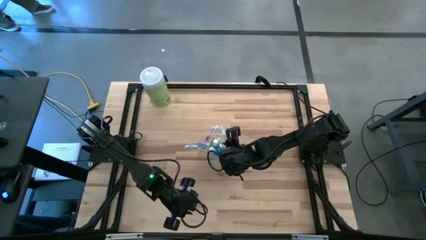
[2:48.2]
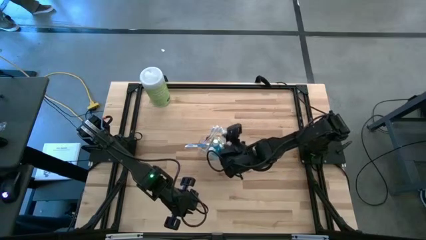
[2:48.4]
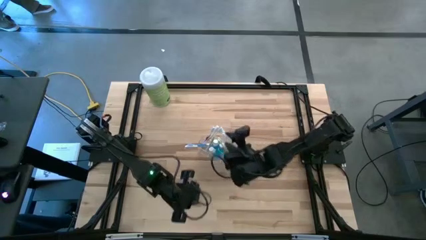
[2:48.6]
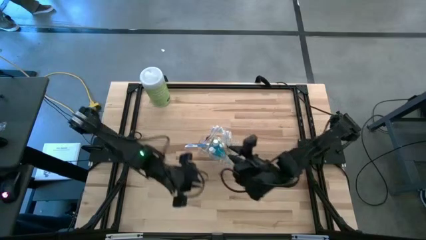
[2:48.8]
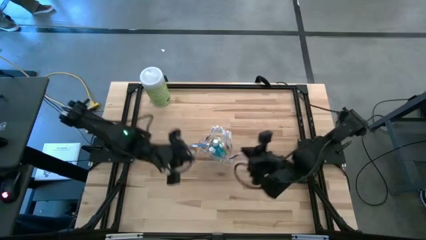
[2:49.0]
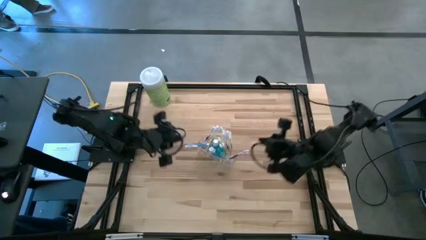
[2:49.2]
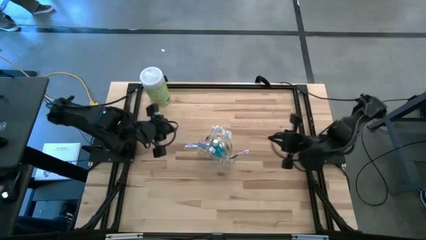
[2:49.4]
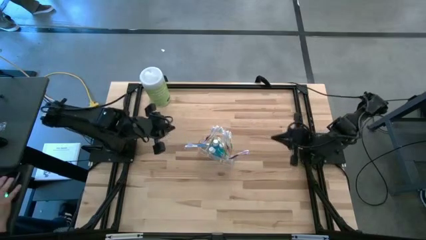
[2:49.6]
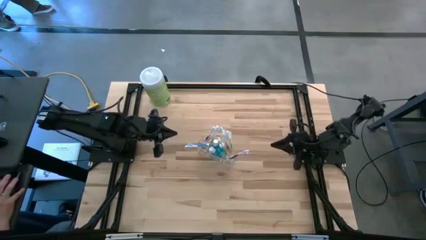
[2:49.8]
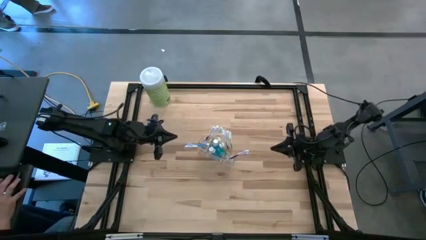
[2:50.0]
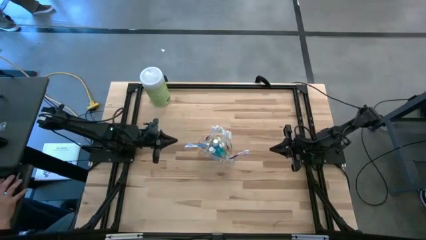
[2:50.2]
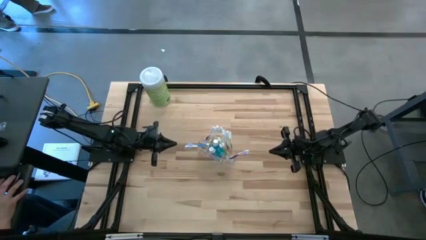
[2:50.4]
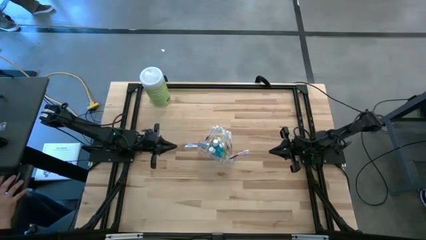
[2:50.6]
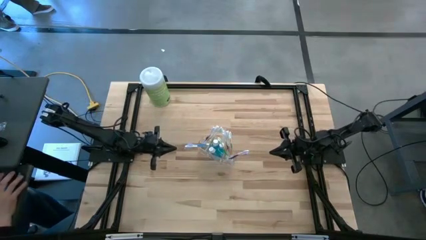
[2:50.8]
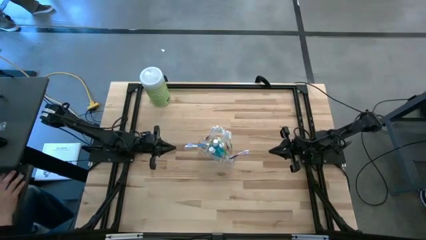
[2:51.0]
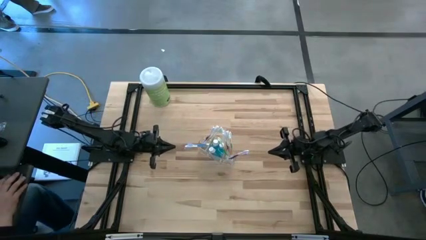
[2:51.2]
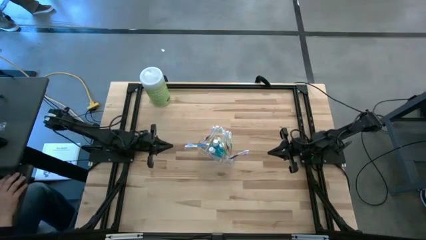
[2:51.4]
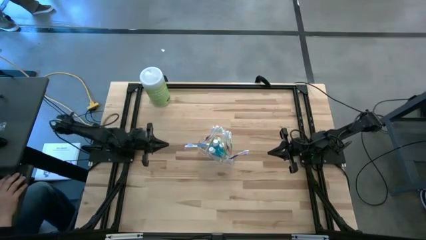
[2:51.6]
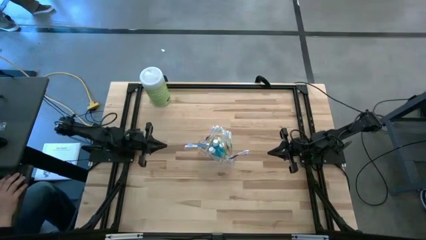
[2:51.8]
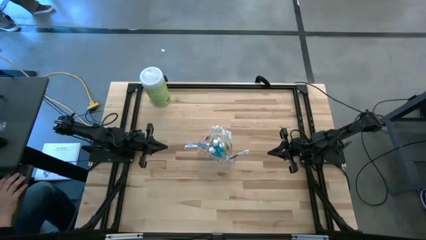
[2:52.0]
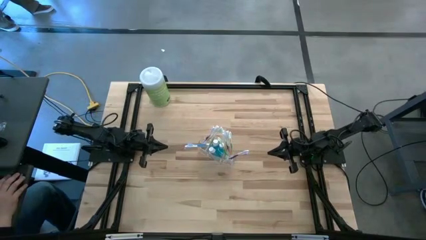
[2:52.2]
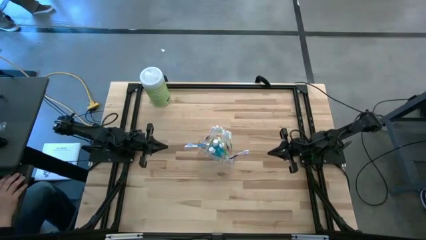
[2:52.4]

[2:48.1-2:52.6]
Task: Pick & Place toothbrushing station
Return to Home Position

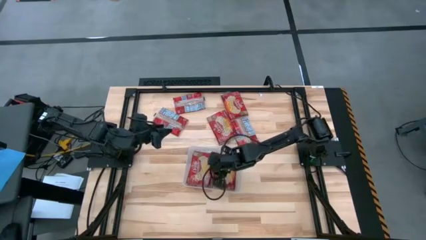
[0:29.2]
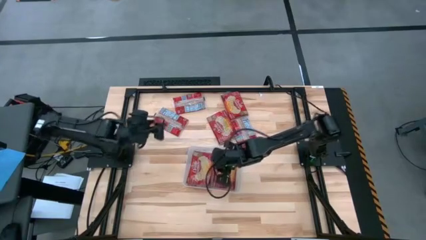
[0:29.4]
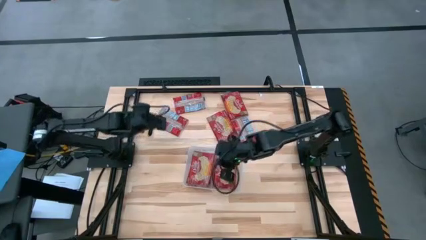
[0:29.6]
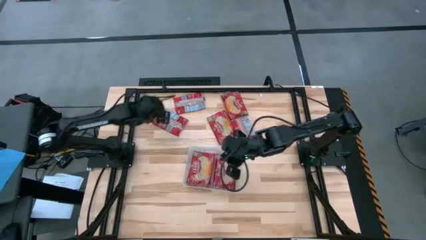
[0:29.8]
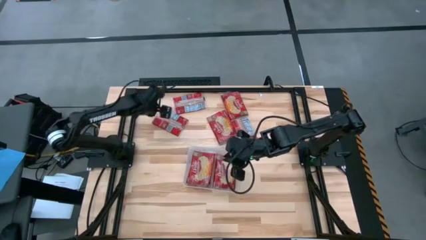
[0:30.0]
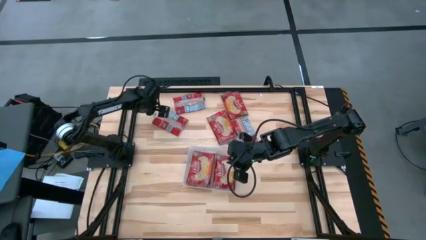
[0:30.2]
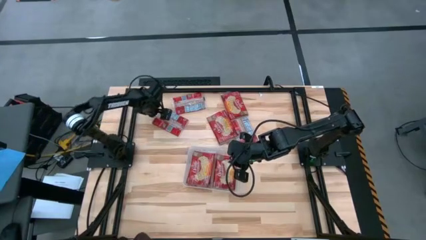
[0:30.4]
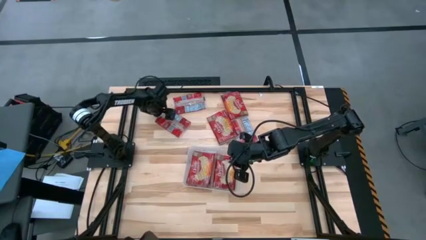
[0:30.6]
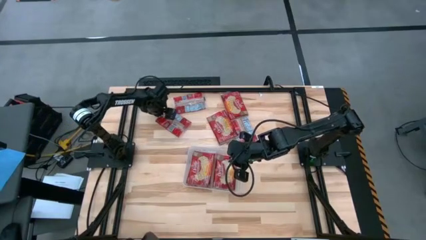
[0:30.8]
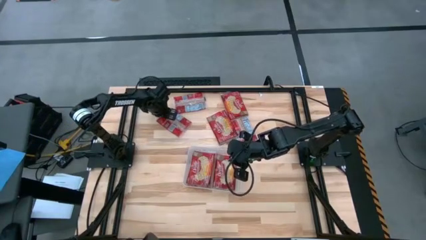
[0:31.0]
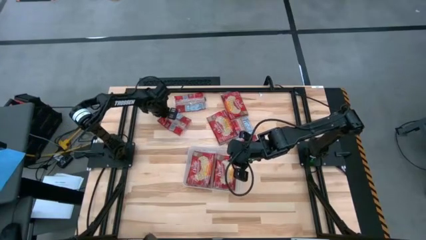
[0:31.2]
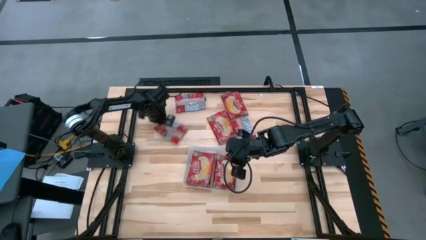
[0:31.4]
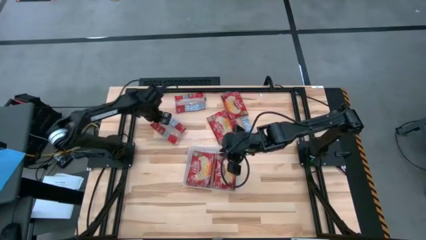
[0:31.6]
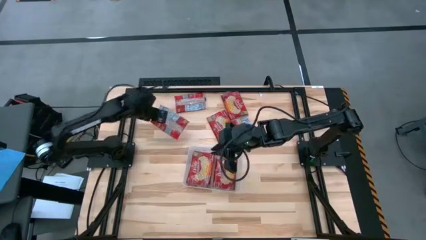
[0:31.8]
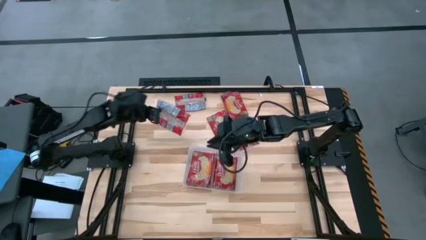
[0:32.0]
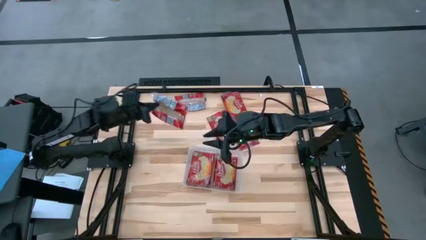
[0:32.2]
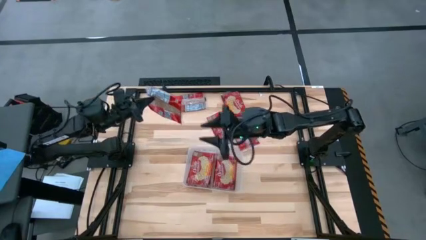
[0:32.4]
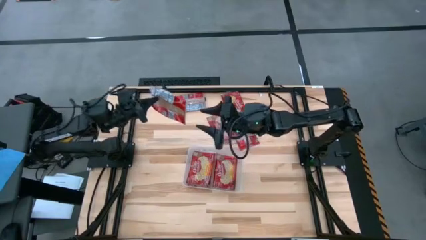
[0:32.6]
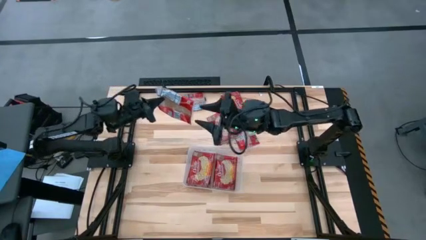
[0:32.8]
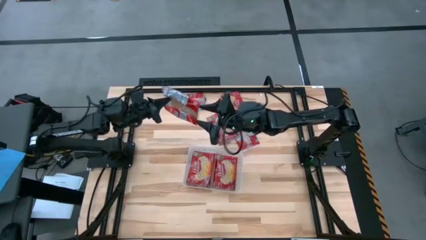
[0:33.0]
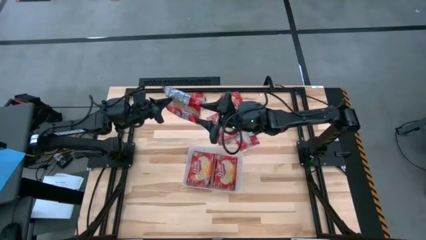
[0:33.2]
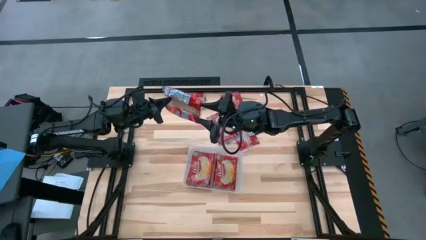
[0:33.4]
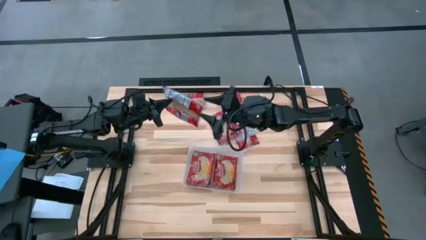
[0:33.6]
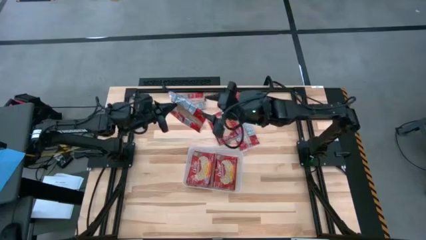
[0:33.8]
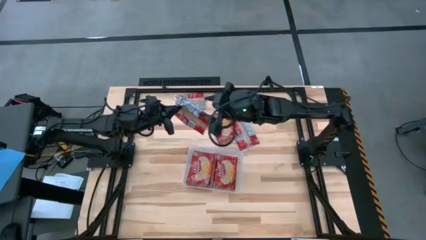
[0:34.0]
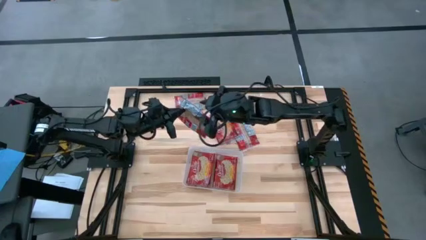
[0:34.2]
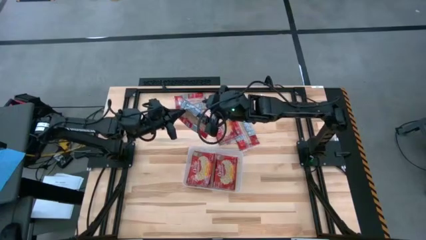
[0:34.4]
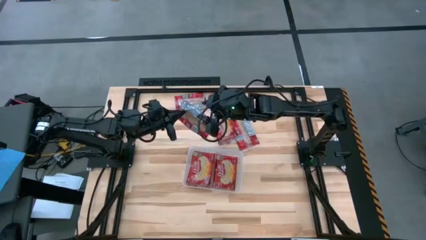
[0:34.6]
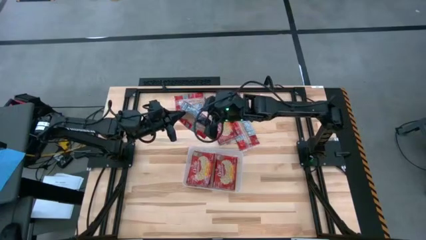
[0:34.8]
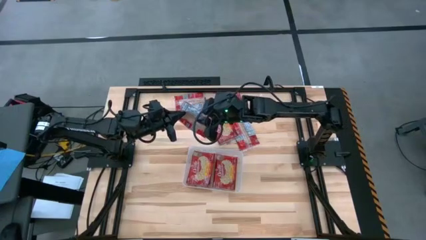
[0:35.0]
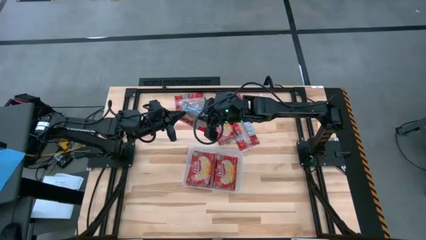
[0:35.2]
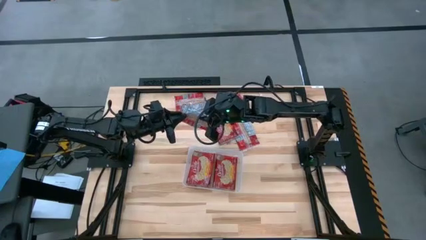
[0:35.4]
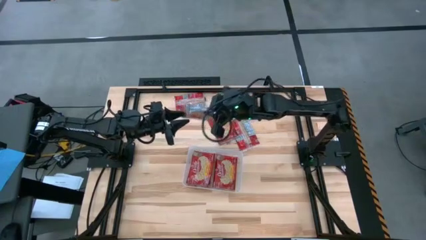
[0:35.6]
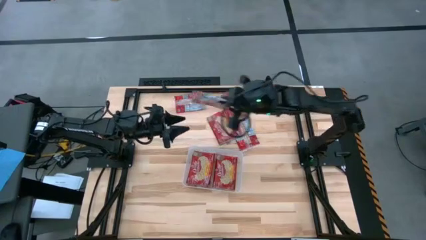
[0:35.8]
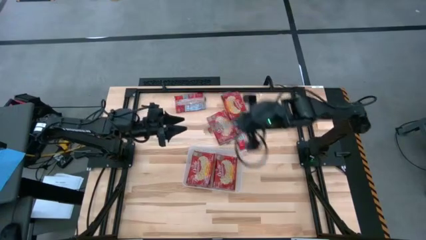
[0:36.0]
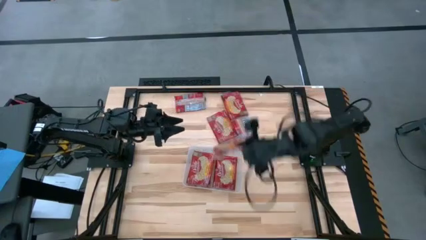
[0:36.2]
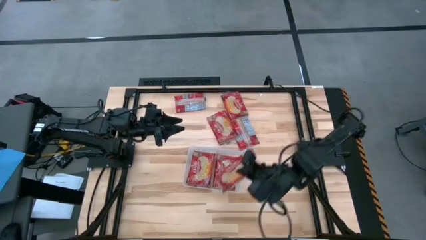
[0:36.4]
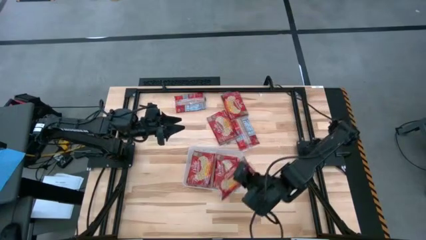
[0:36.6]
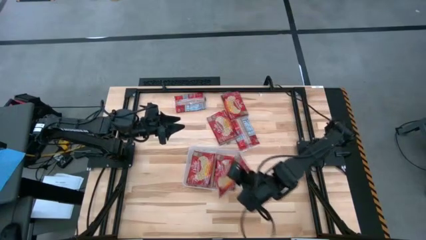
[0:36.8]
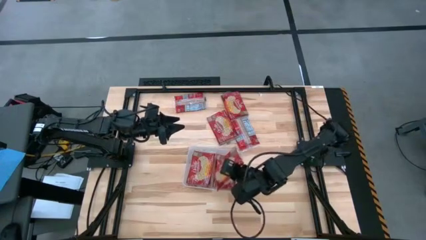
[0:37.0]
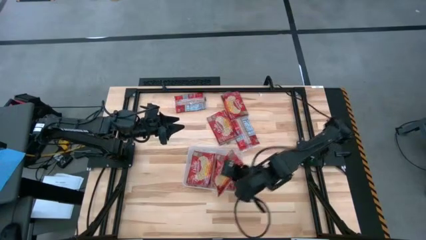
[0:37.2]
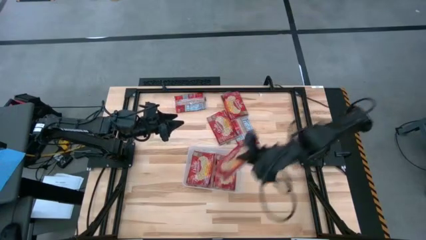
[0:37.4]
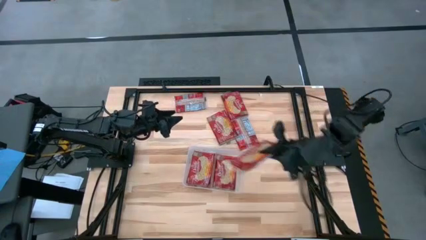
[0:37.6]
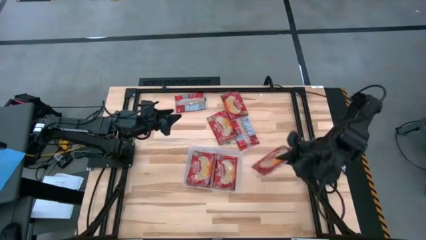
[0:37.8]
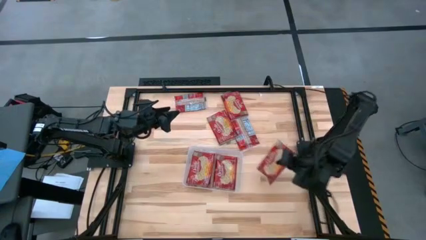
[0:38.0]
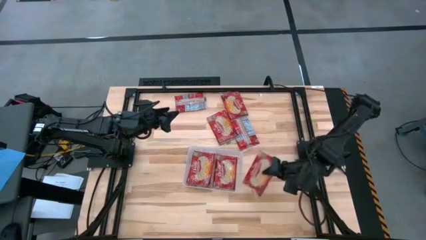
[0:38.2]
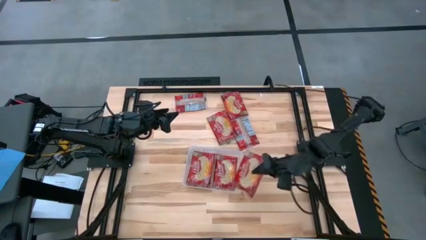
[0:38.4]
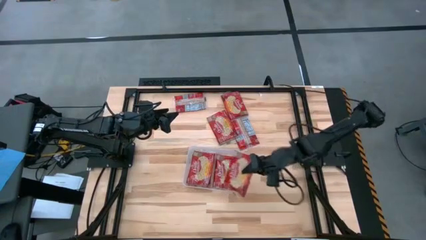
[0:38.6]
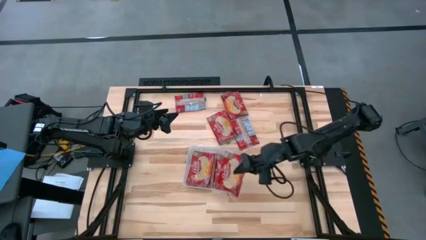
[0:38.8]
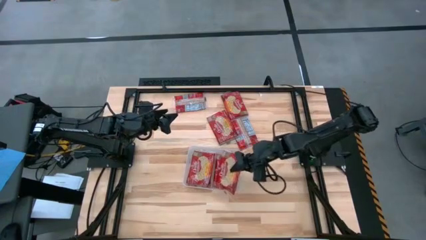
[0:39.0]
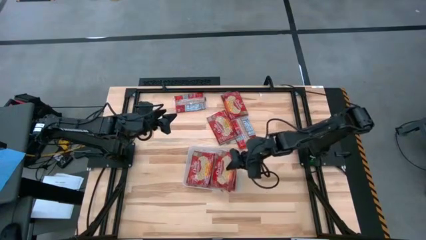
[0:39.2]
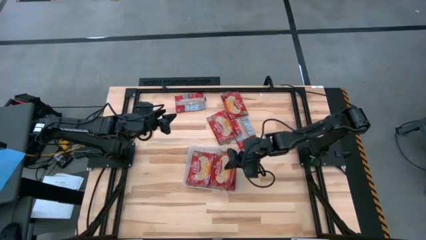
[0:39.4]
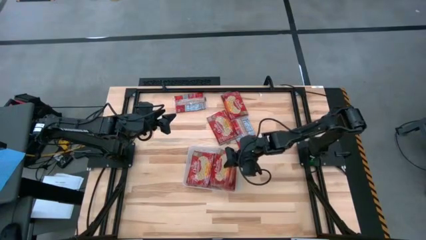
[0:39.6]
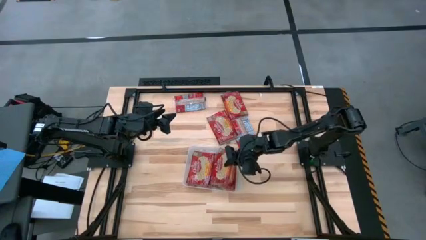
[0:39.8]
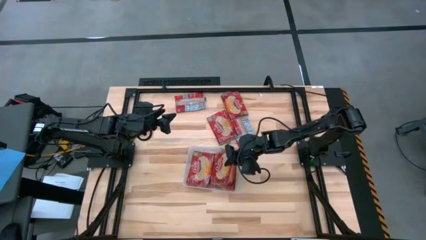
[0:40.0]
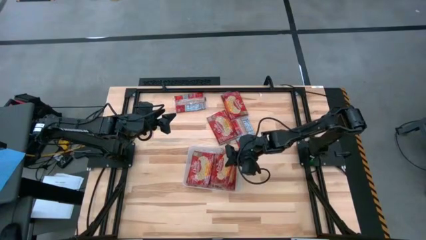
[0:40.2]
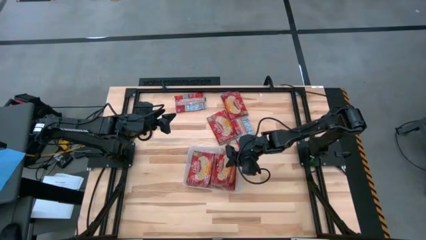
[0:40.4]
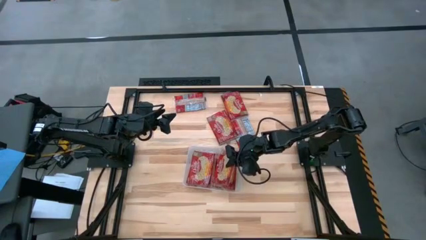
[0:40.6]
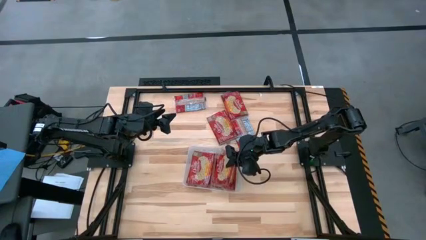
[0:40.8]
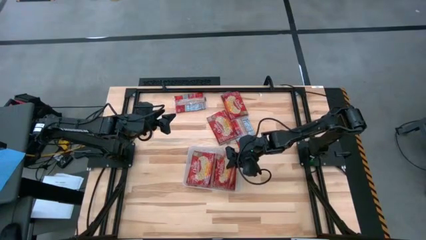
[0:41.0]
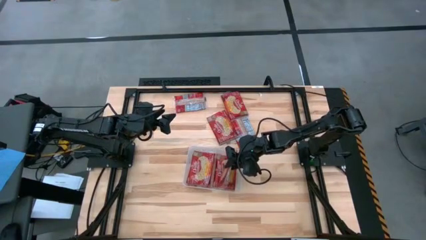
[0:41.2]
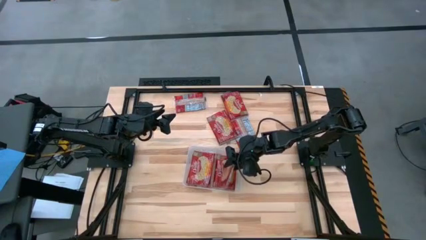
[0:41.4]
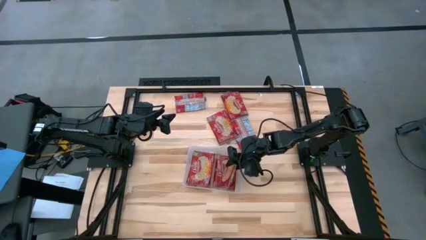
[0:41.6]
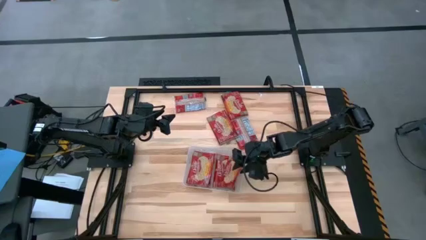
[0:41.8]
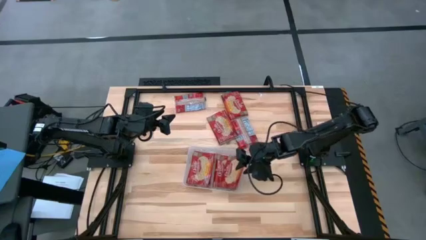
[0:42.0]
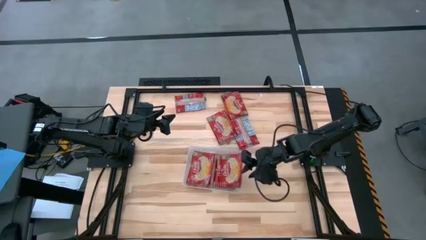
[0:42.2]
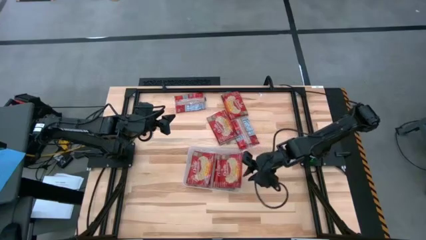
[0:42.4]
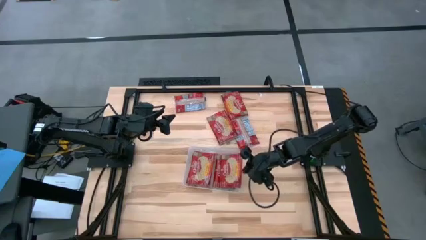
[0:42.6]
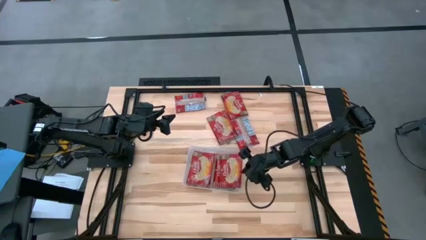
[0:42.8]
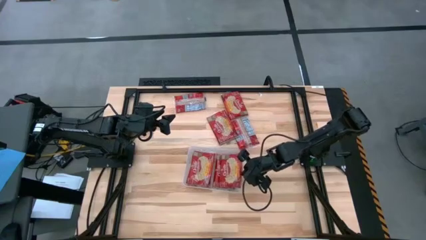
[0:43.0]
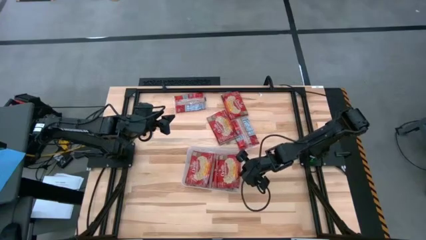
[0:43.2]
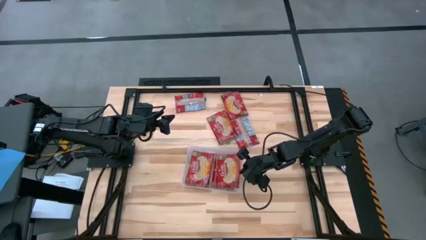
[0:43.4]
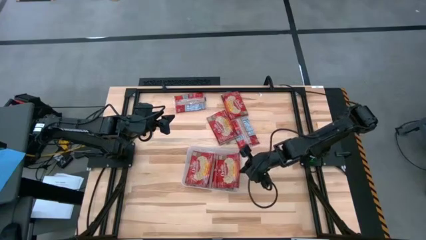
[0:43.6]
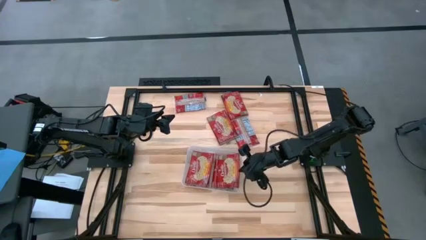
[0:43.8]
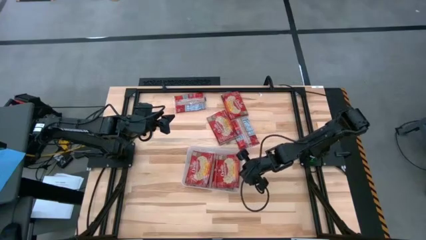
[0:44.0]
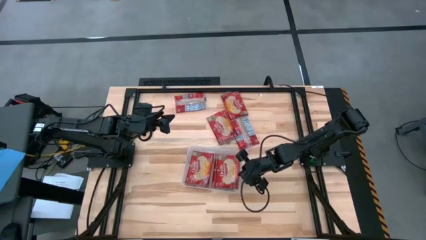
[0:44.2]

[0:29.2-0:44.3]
Task: Sort popcorn bags into baskets
Put the red popcorn bag into the transparent bin
